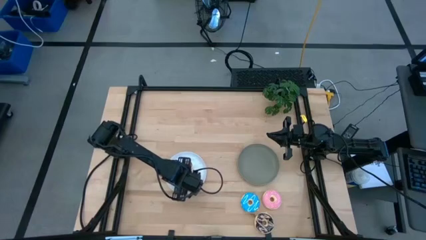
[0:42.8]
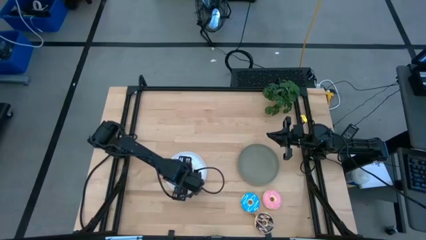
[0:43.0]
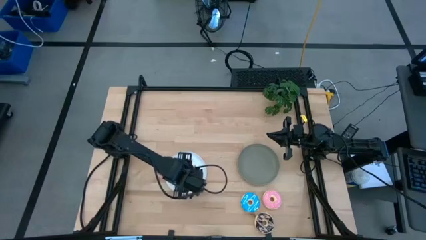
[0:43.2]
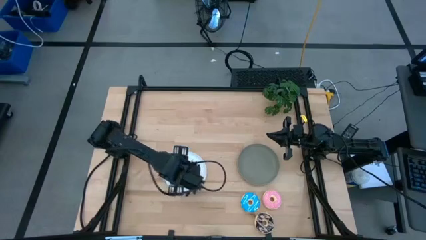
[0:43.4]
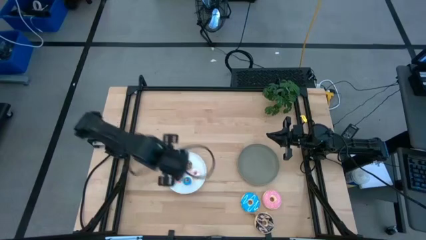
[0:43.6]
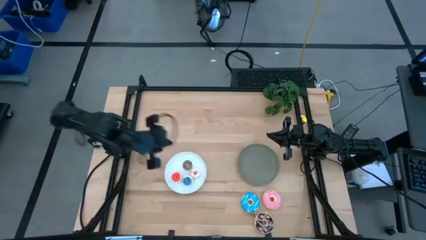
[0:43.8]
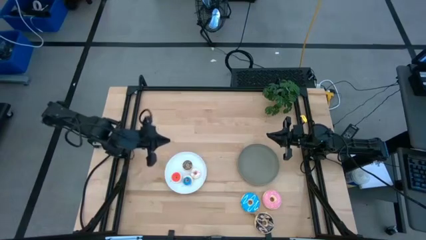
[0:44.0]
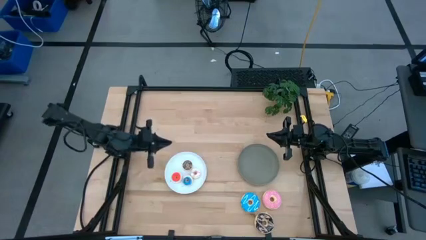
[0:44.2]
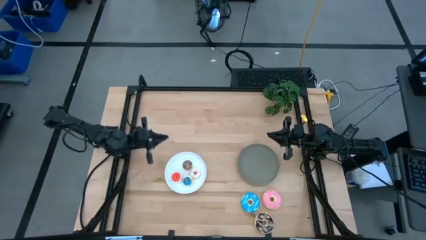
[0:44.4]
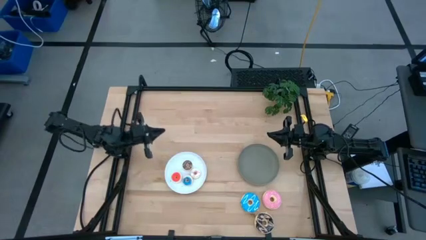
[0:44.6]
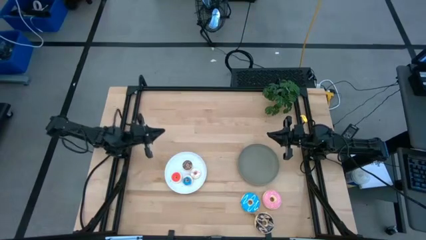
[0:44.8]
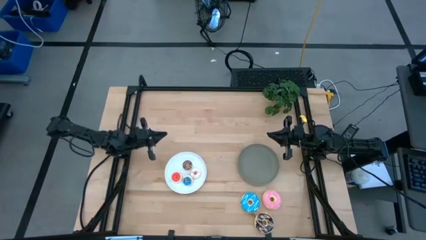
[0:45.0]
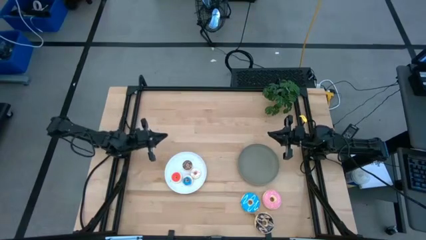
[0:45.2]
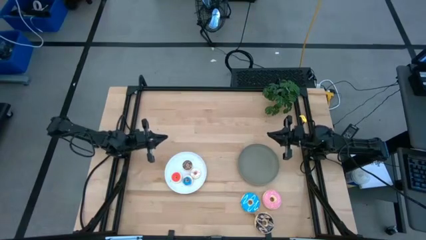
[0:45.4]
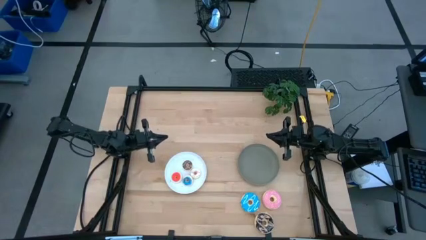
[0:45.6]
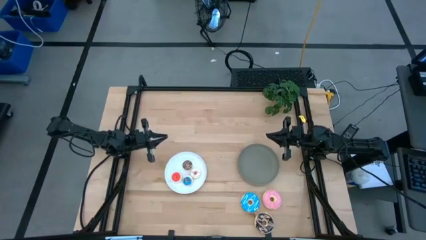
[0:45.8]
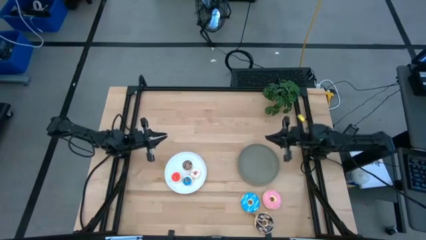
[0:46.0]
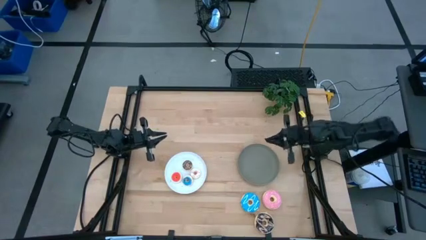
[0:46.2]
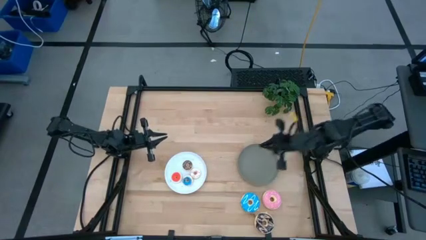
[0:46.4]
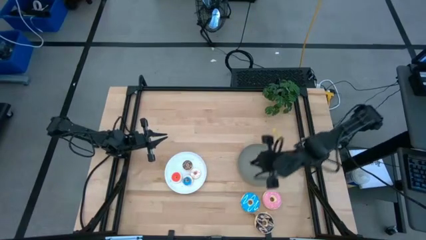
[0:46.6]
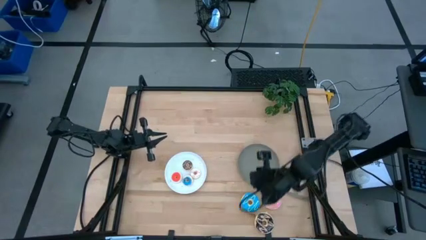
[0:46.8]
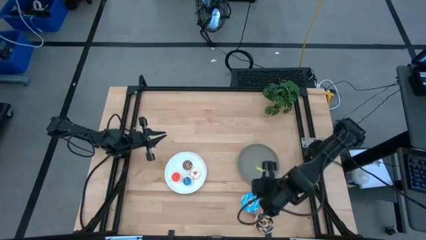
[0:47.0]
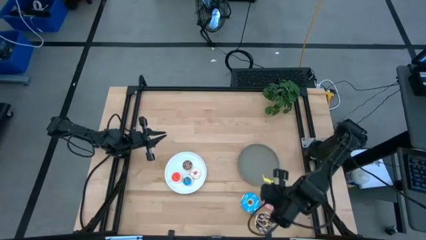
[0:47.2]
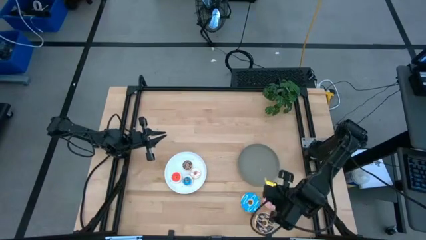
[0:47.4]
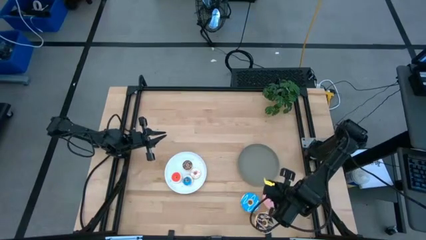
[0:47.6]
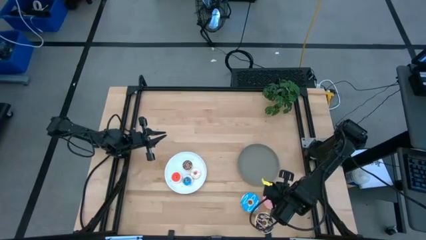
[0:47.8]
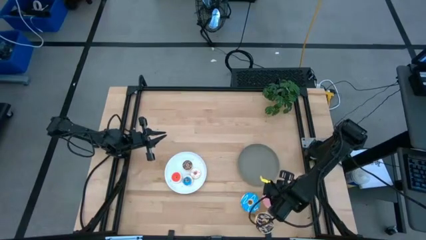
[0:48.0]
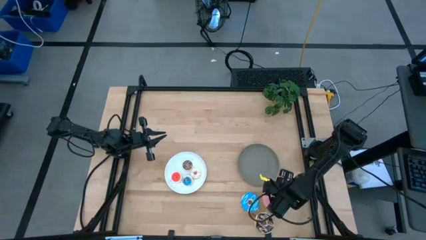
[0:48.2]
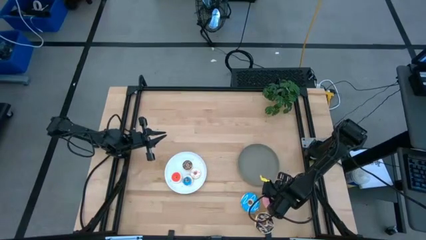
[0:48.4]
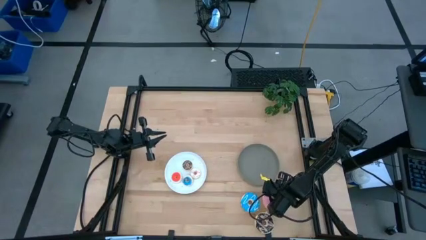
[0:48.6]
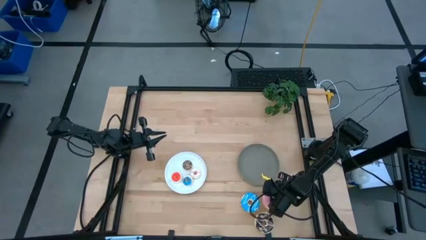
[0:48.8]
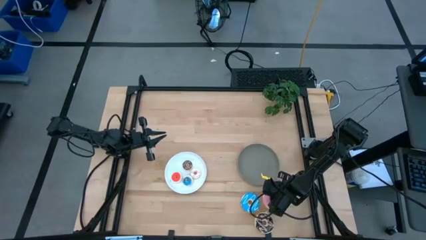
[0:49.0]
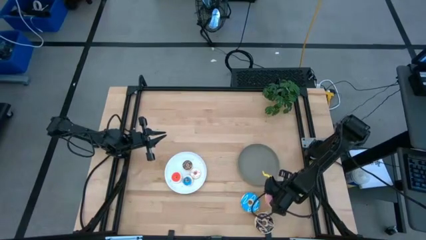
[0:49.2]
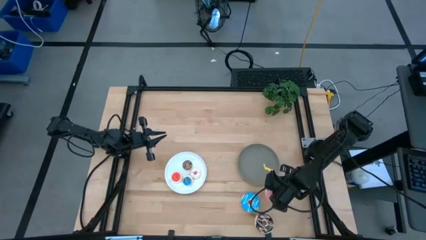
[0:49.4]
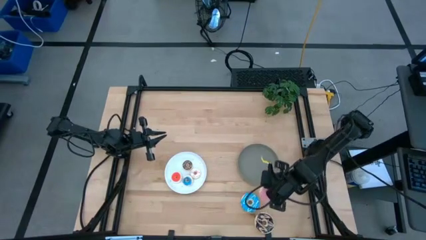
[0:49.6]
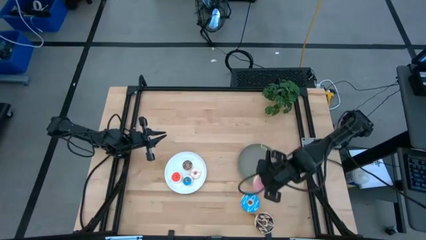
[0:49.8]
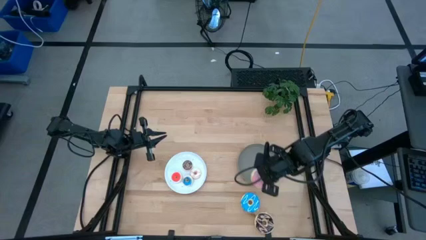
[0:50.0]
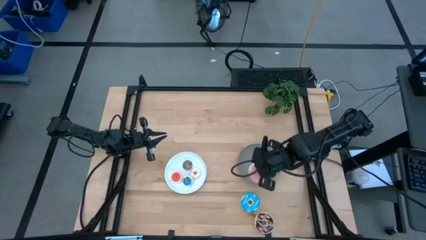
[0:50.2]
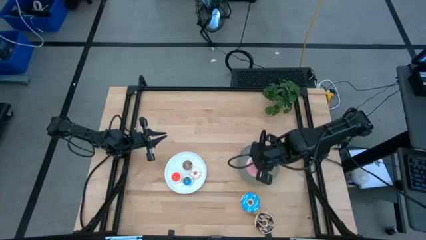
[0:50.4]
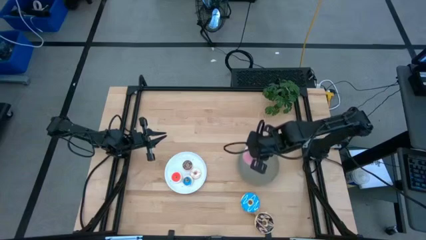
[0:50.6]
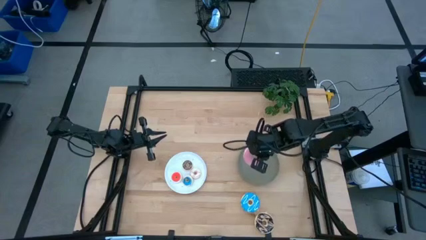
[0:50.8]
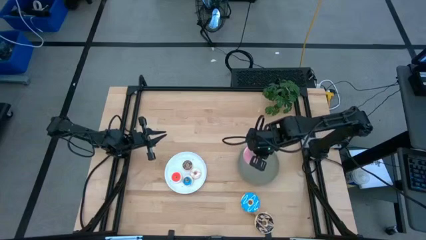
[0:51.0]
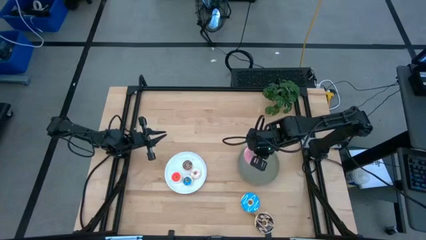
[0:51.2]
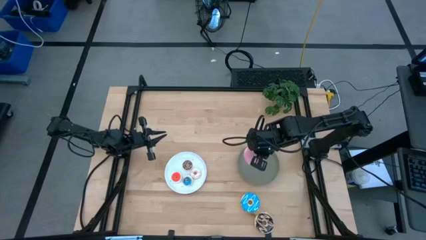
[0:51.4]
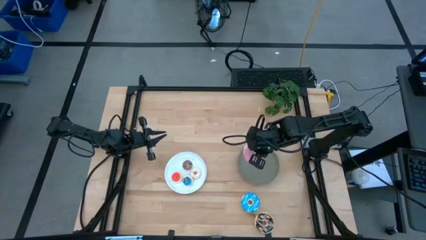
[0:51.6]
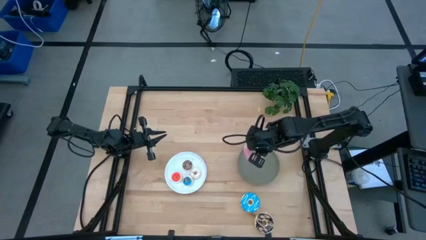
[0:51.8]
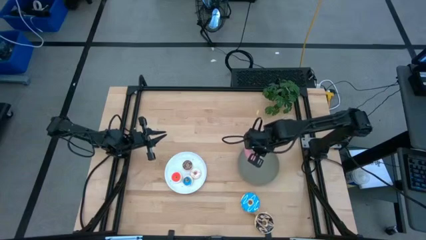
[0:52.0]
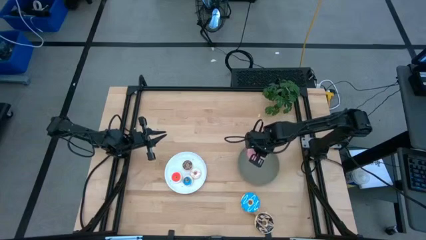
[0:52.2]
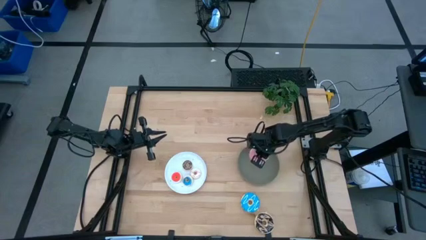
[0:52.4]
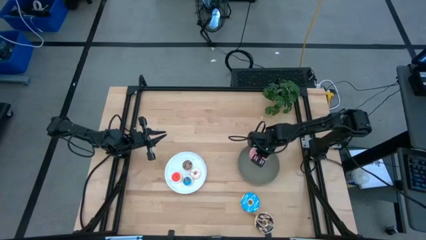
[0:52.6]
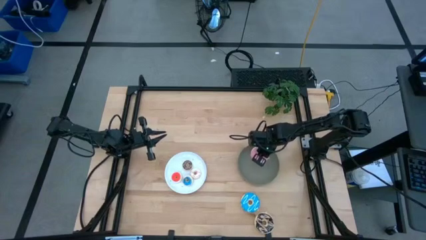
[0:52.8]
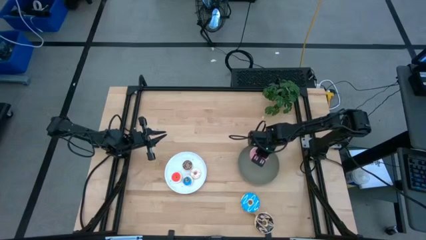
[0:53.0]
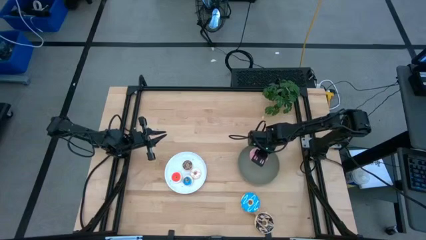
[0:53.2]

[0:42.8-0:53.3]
Task: Pick & Place donuts
Put the big pink donut on the gray plate

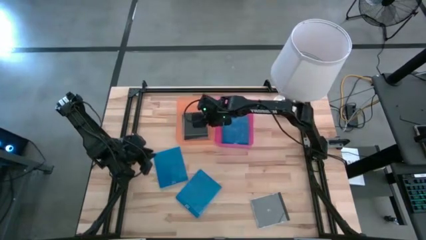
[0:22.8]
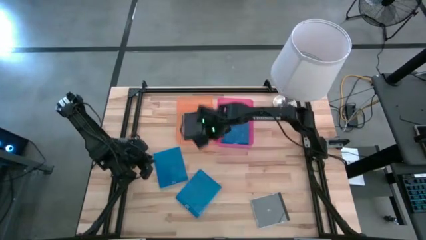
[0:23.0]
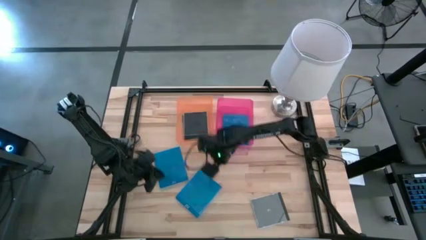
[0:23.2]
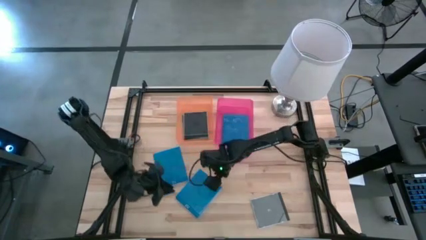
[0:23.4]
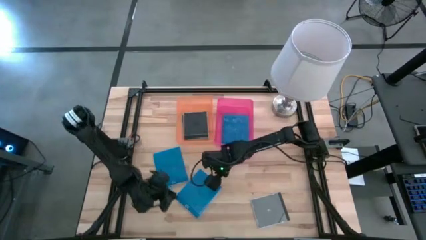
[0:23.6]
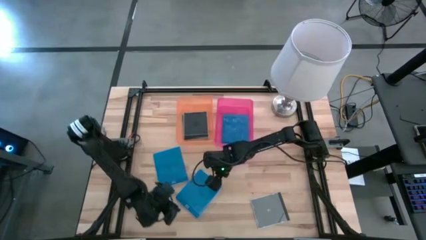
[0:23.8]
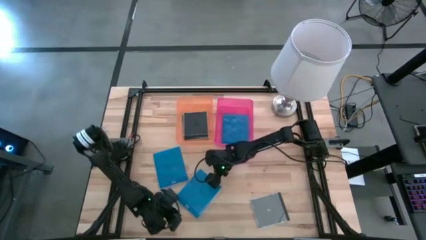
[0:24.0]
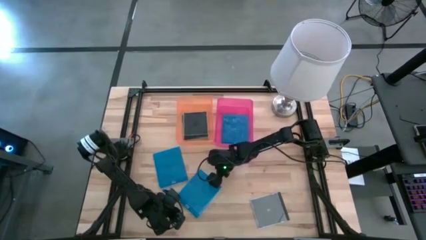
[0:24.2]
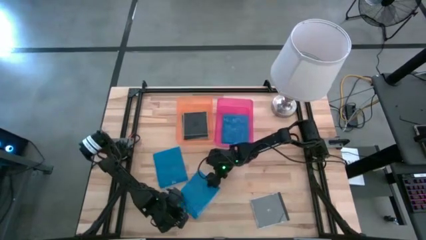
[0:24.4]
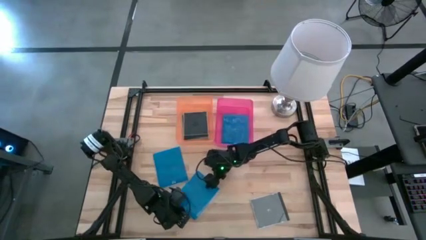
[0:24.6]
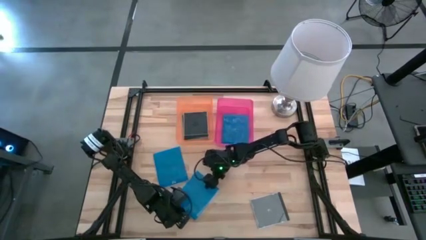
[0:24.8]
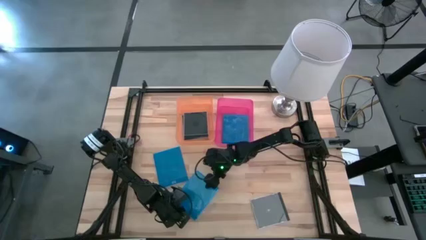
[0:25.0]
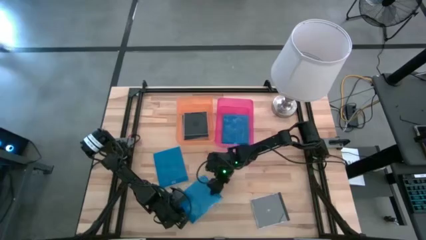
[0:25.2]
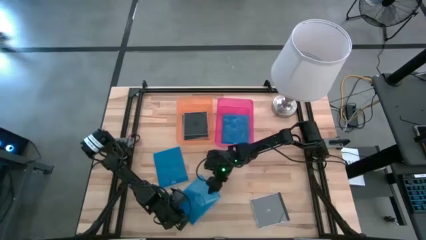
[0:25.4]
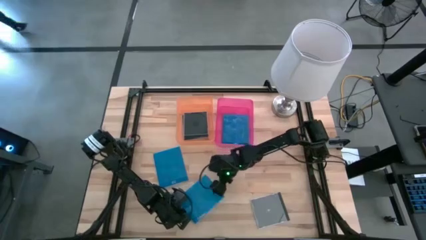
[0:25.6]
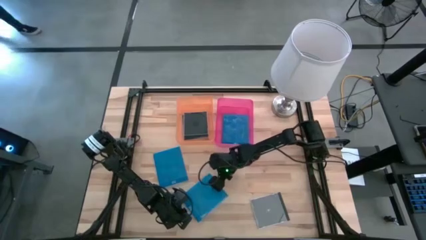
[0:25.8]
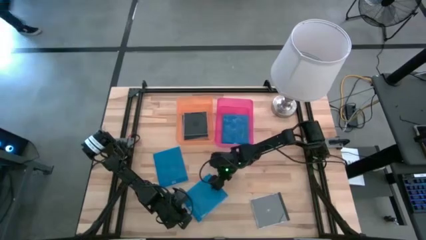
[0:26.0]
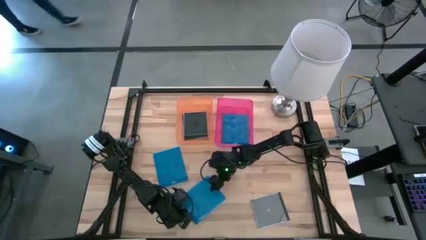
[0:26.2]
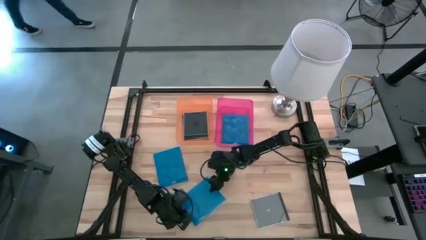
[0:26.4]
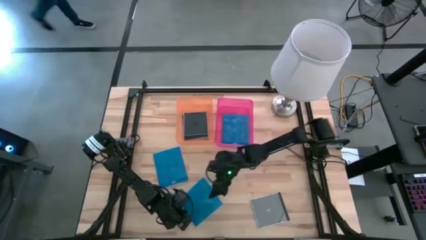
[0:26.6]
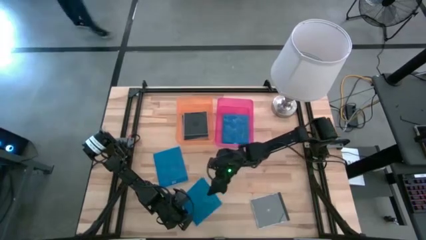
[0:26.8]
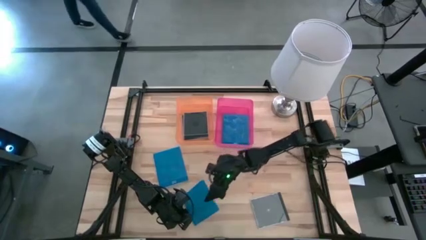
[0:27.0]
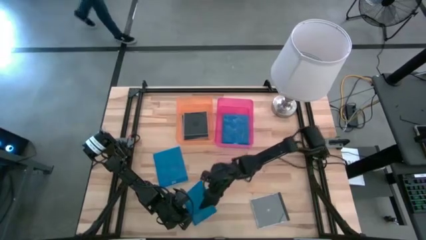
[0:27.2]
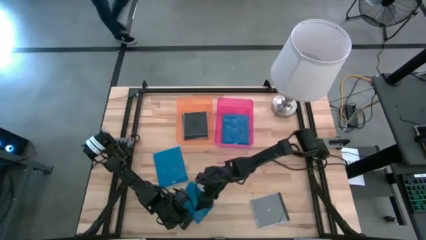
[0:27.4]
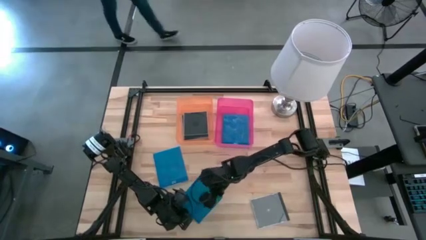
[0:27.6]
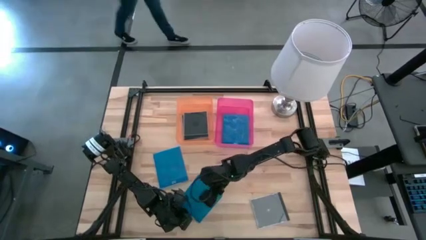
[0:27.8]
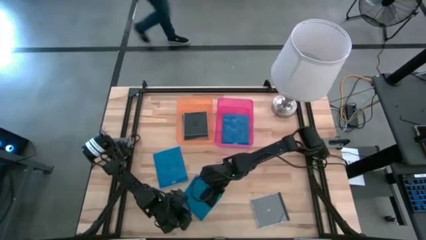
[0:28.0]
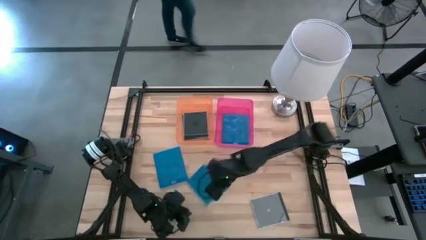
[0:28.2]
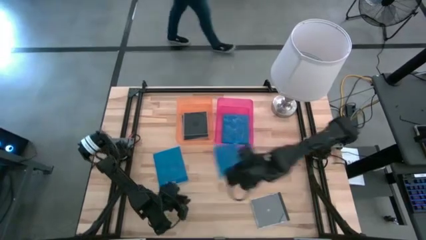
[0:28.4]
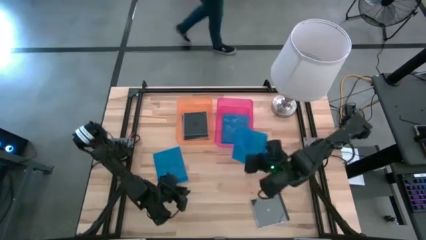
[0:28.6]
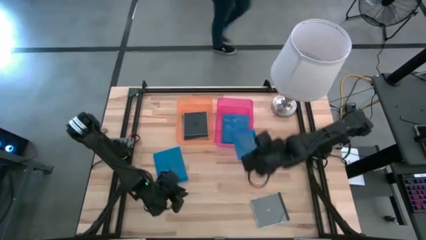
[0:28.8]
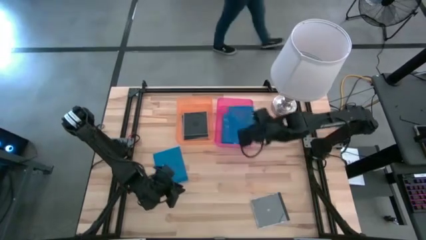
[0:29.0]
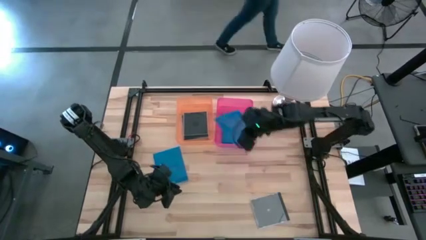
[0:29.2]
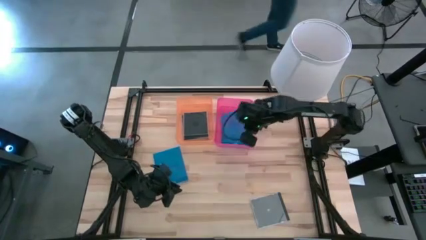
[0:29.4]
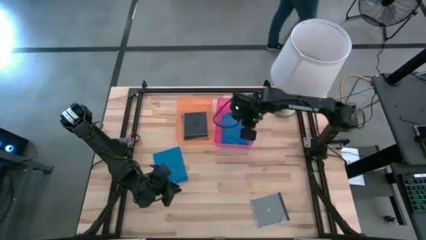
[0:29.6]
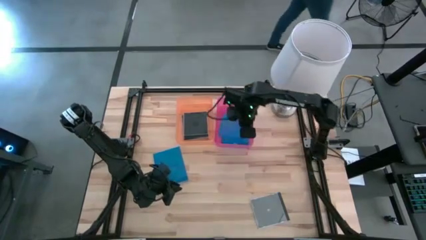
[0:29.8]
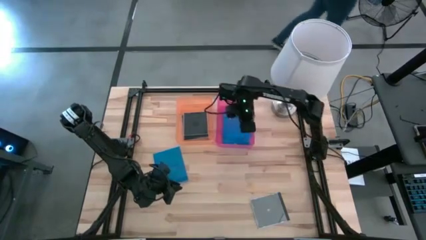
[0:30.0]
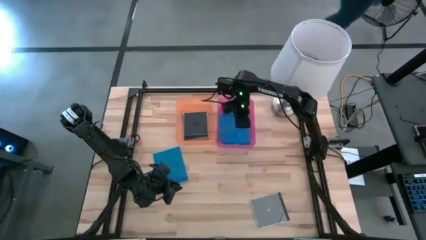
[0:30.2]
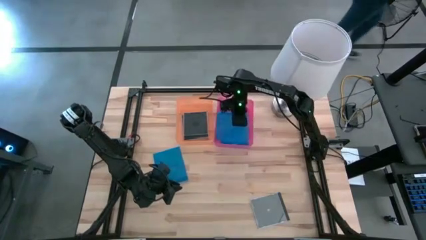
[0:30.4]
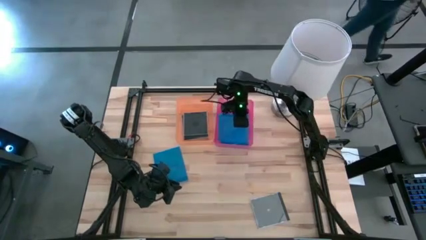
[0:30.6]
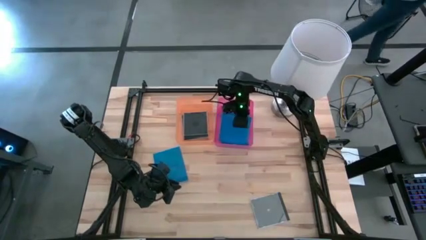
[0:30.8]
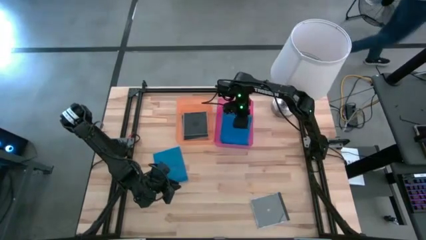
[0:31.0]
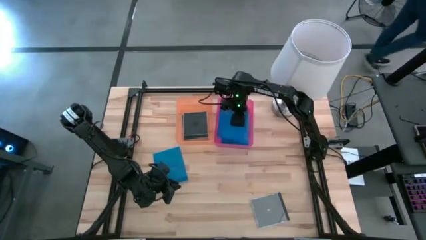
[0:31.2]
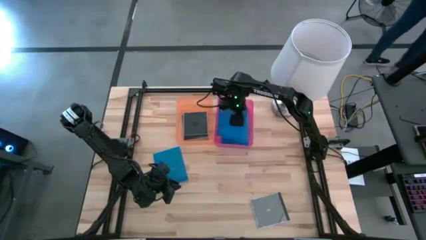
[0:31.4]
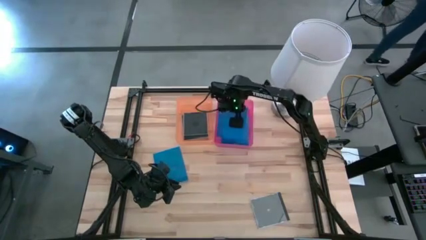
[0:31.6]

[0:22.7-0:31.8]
Task: Pick & place jewel cases by type
Put the bottom blue CD case into the pink bin
